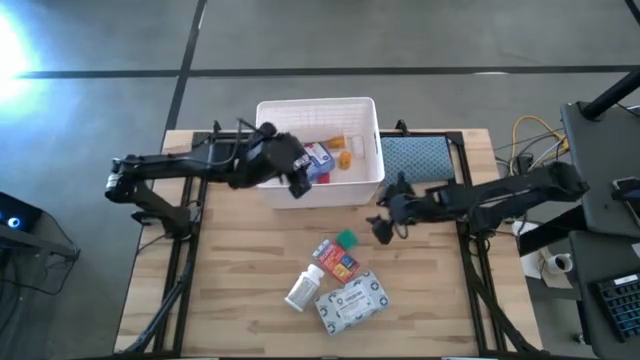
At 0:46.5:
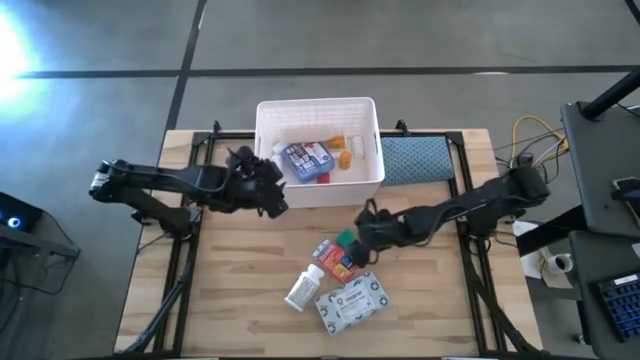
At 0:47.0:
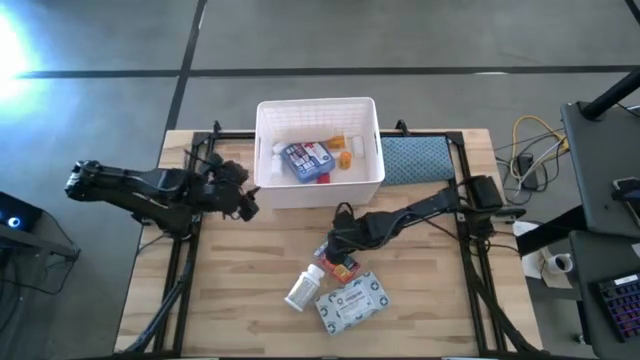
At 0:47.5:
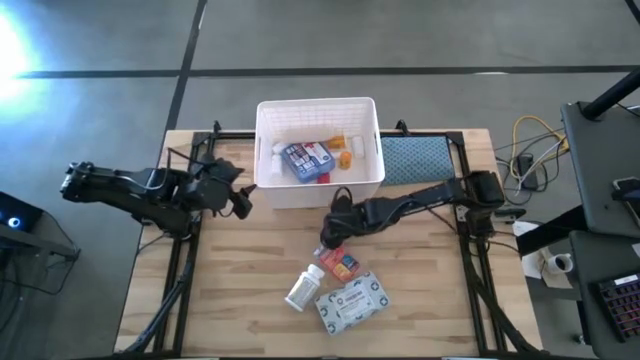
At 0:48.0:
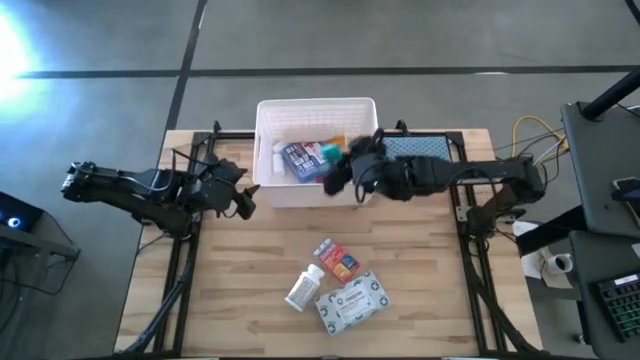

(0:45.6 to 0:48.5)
Task: Pick & place medical supplies in basket/bin
Put the green bandage into the white bin

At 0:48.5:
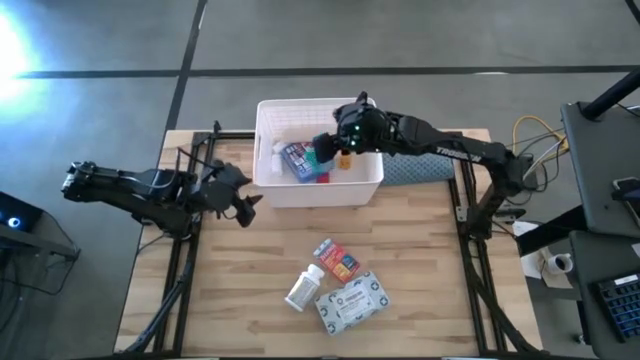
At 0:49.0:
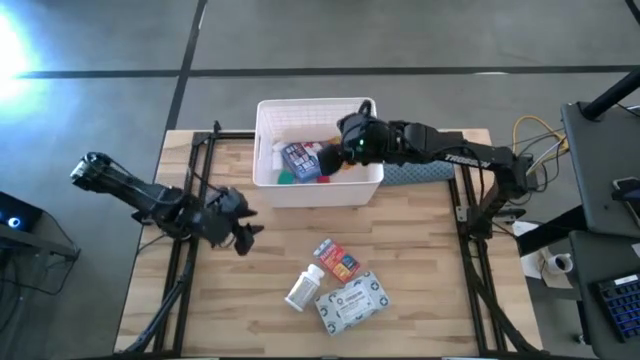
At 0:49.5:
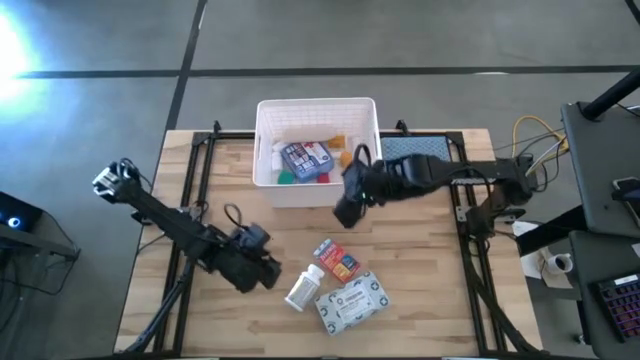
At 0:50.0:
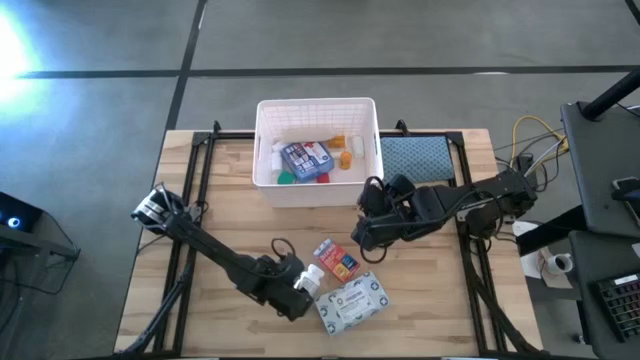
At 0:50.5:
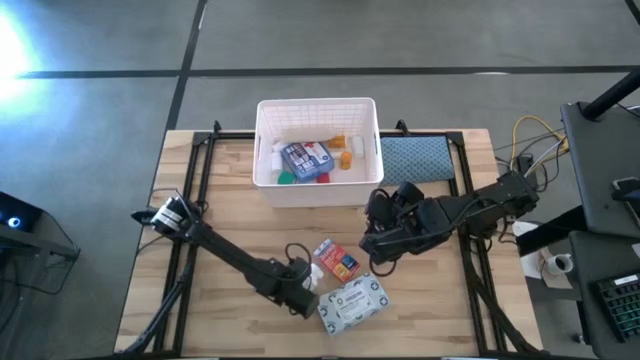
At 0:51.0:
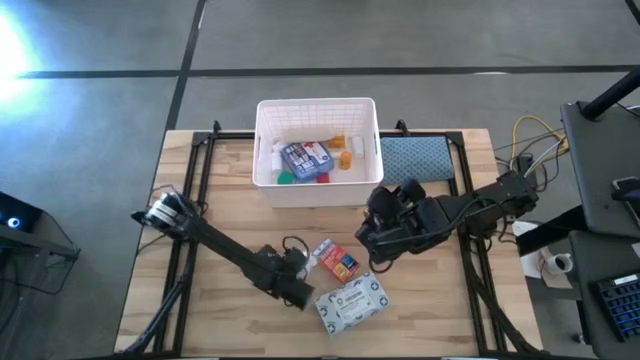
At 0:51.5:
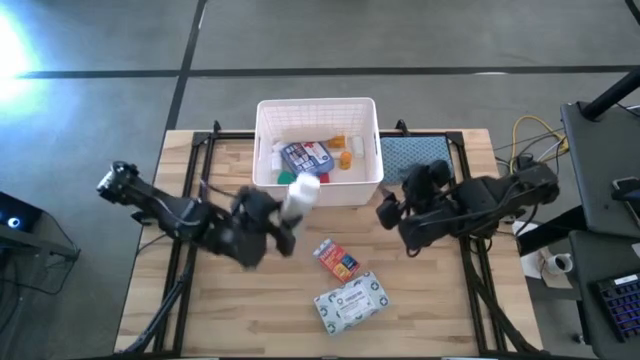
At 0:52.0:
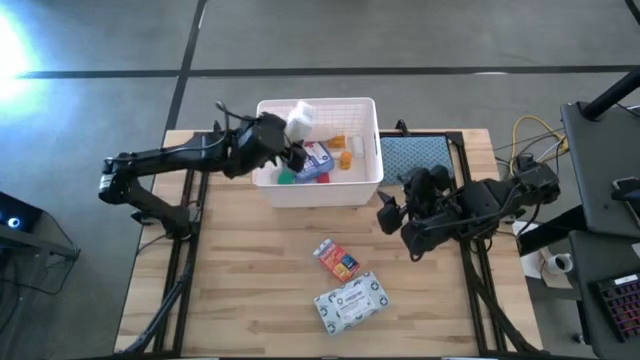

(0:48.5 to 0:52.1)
Put the white and red medicine bottle into the white bin

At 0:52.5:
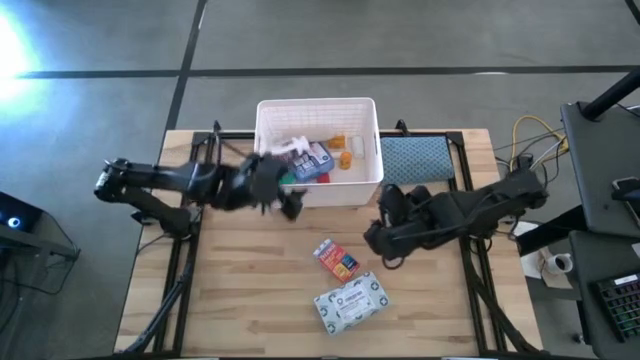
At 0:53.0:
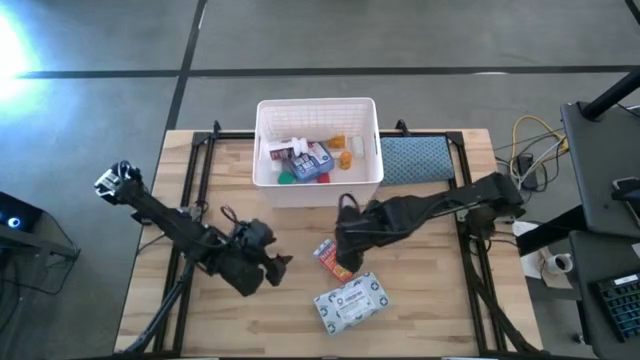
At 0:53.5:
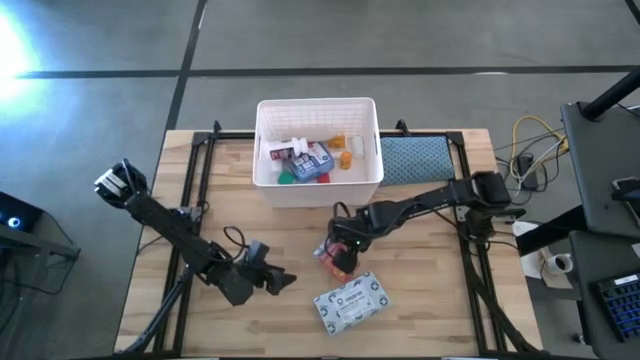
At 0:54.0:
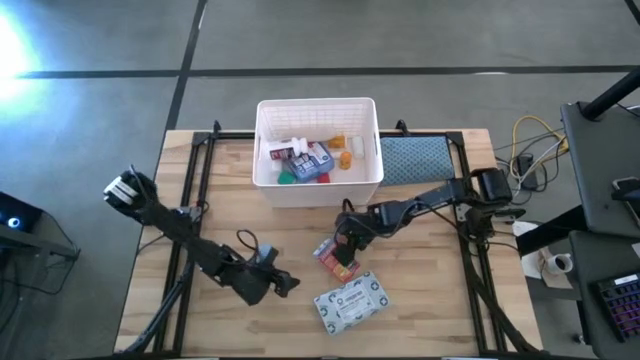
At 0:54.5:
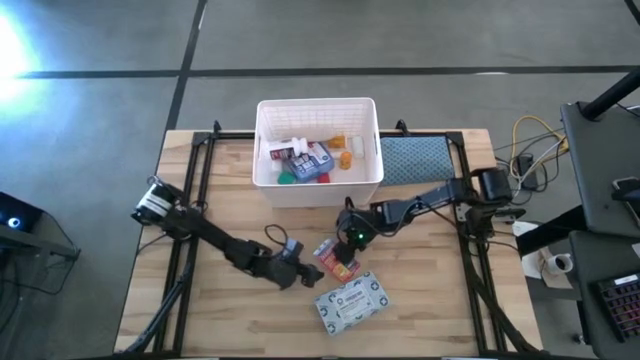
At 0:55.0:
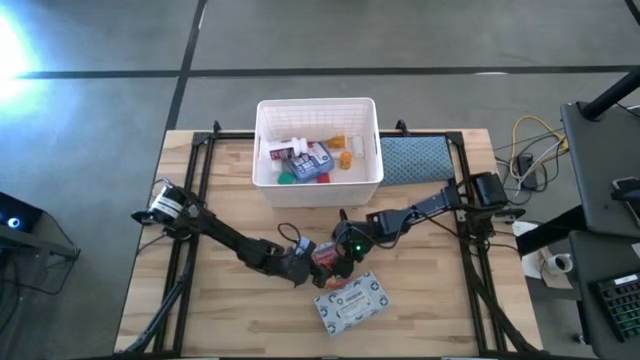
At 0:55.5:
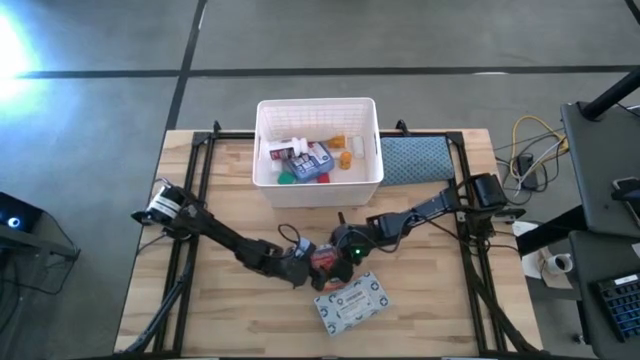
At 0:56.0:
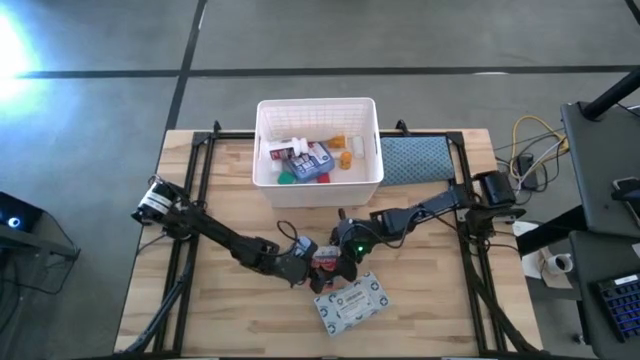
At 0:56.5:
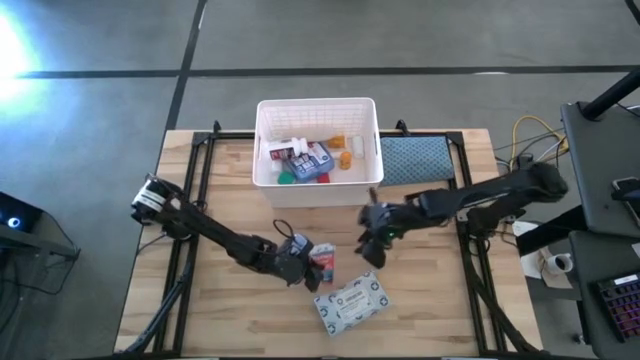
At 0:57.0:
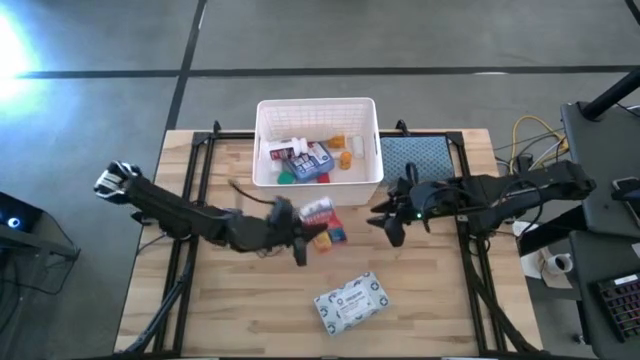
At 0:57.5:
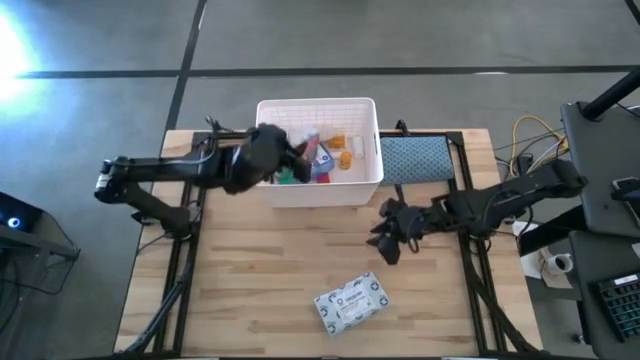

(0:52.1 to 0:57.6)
Put the red pill box into the white bin

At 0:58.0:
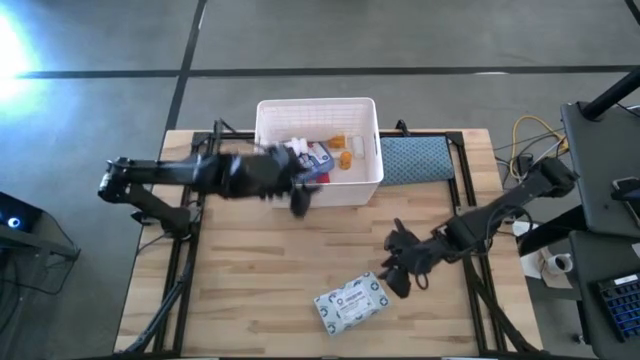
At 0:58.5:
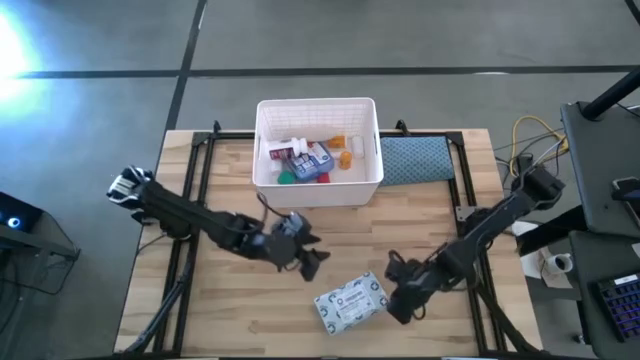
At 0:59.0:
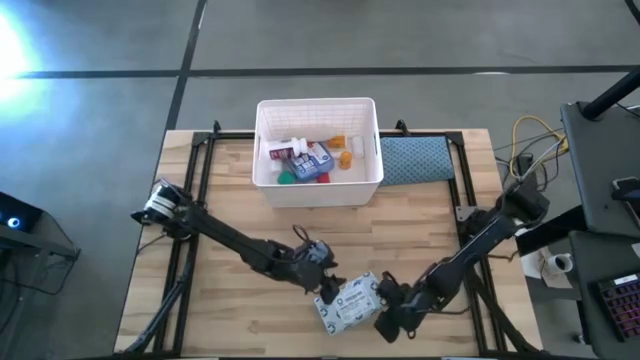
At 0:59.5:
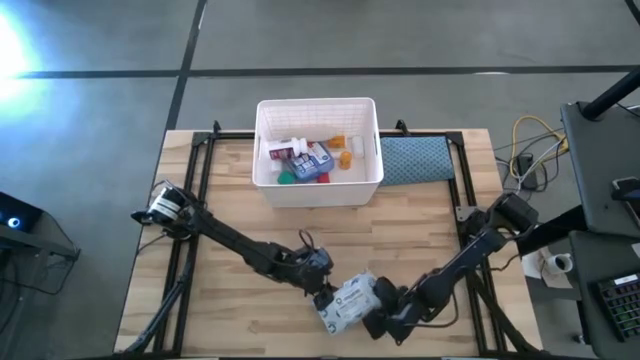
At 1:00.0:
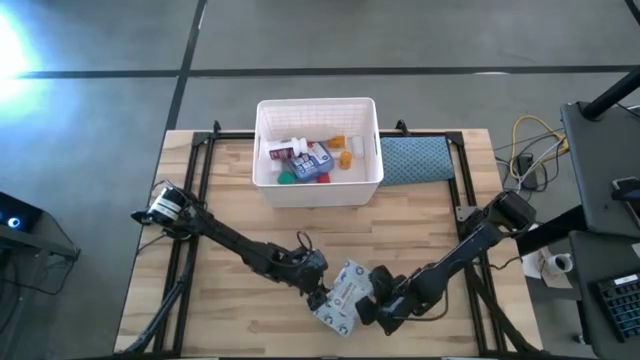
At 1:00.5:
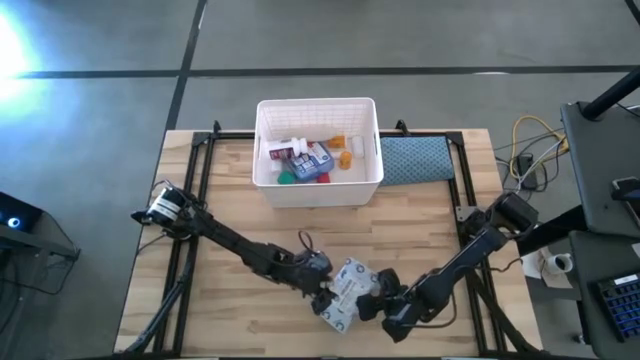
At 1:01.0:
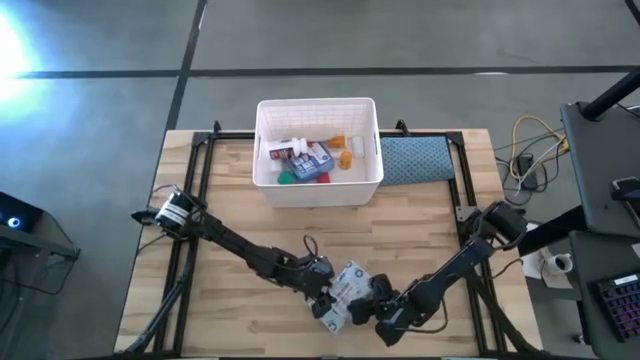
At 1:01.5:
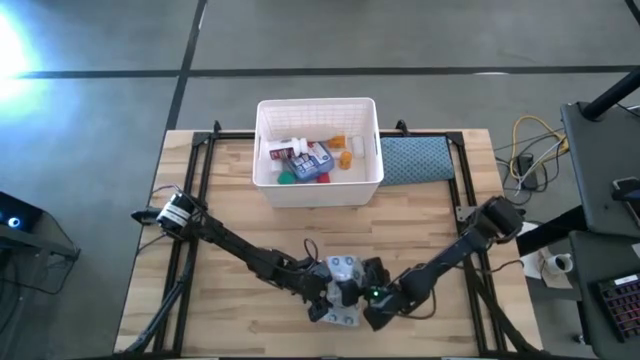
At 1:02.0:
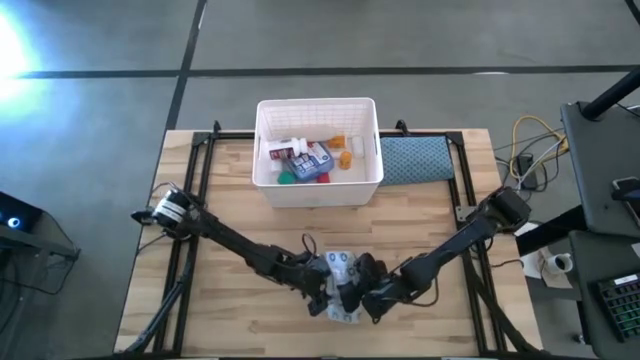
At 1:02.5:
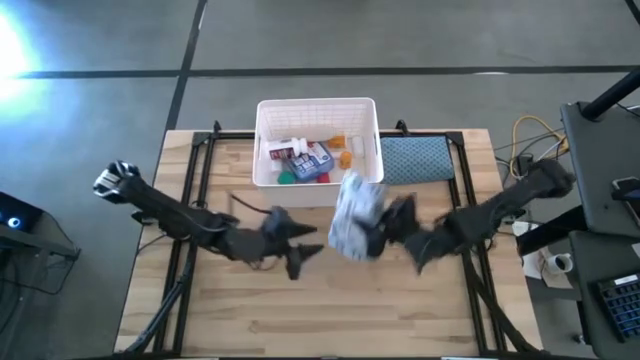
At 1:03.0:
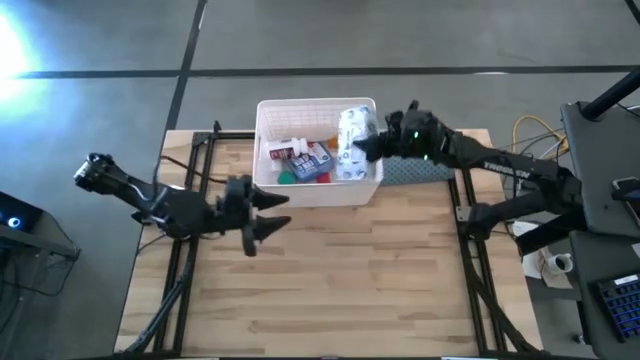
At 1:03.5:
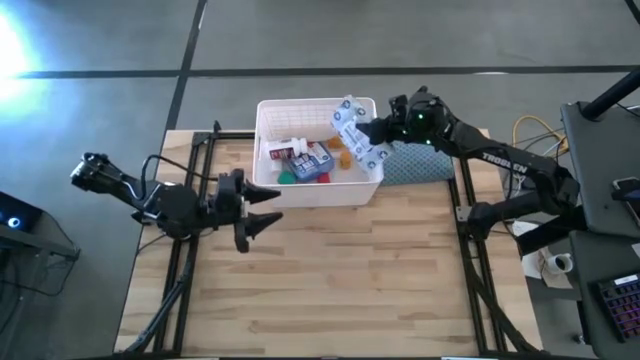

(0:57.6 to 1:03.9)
Put the white bag into the white bin

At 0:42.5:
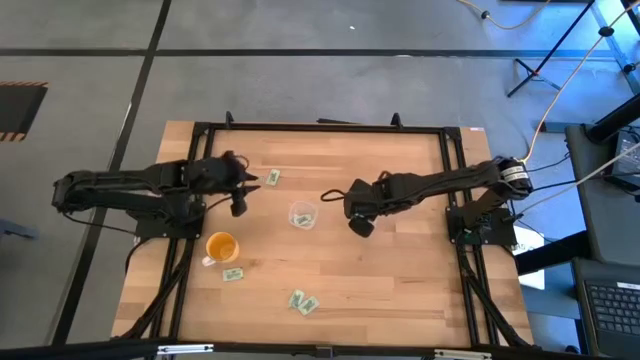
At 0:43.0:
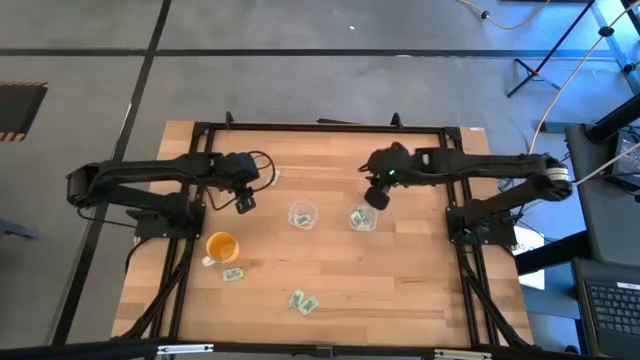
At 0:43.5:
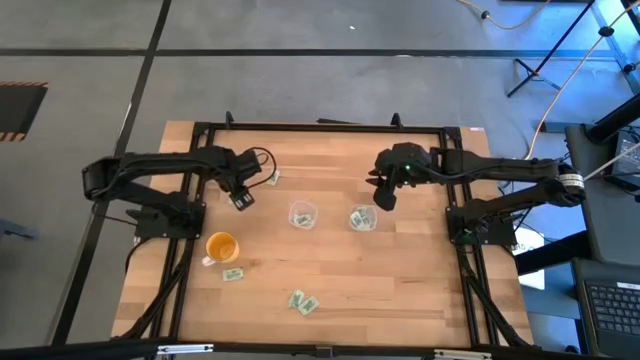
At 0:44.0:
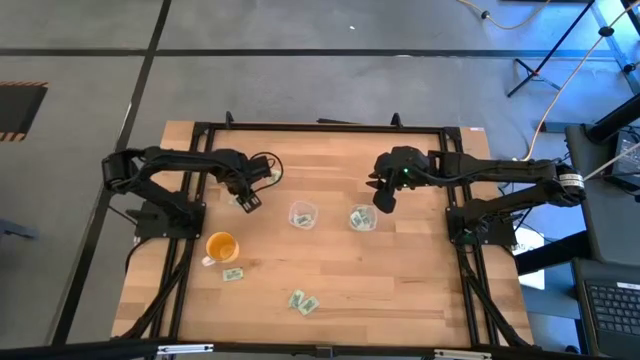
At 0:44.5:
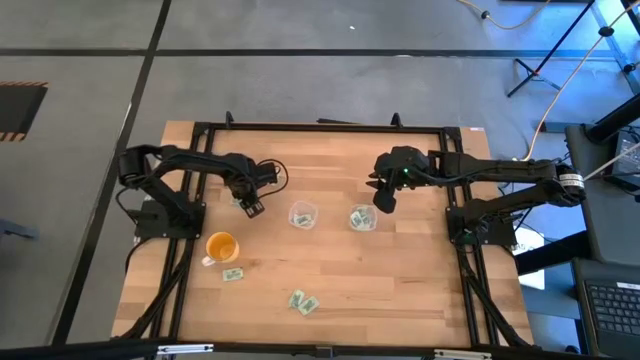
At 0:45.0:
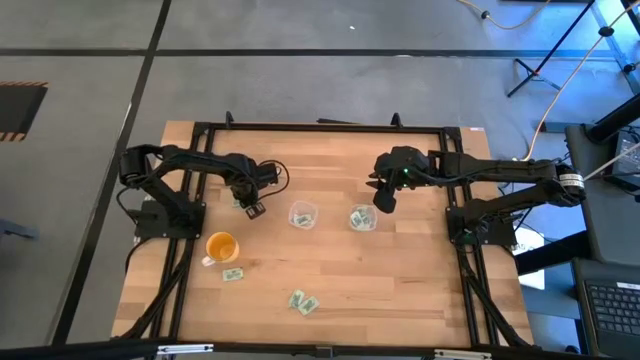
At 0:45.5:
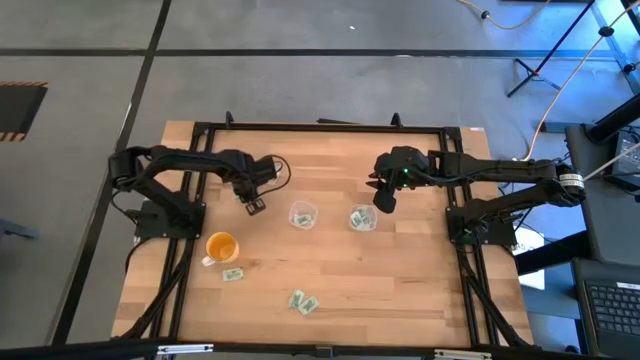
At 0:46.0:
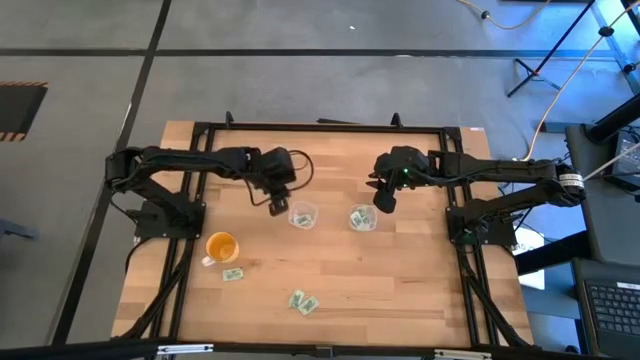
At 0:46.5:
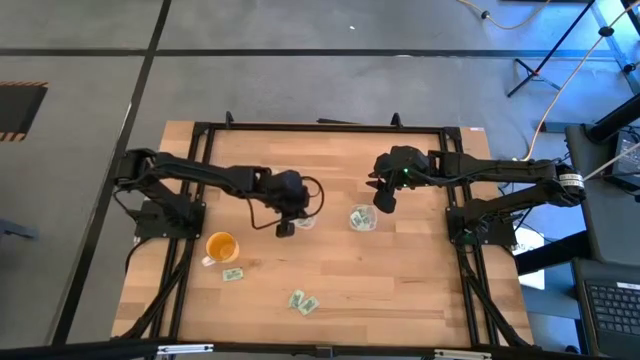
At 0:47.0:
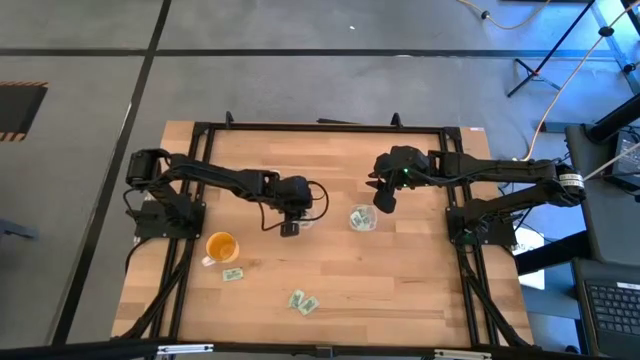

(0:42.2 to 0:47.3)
Task: Pick and place Stevia / Truvia into bins
Put the stevia packet into the left transparent container
